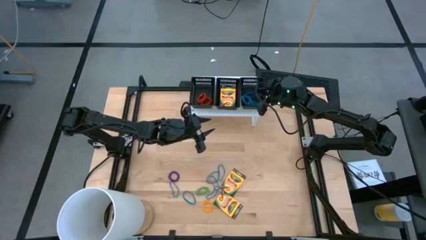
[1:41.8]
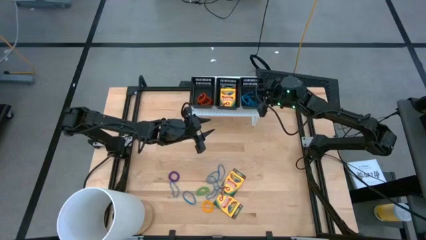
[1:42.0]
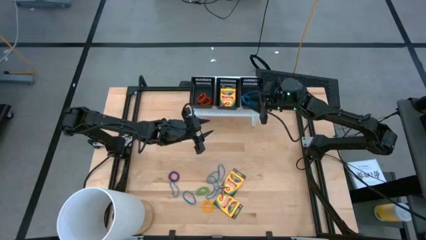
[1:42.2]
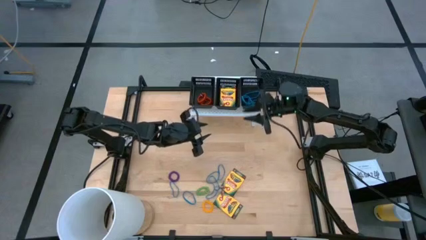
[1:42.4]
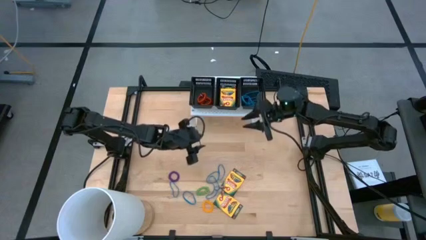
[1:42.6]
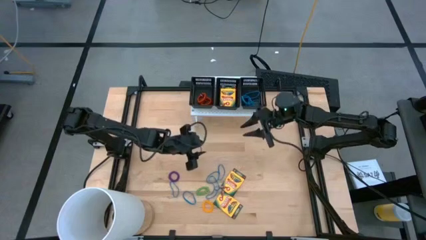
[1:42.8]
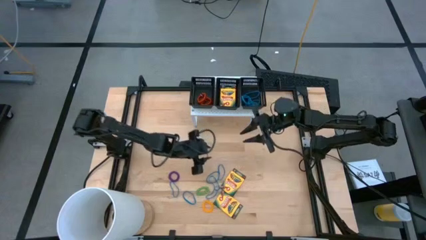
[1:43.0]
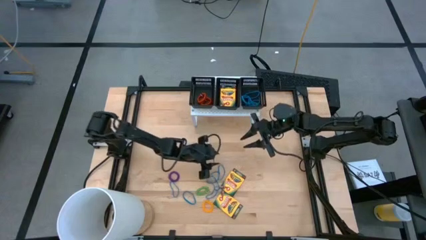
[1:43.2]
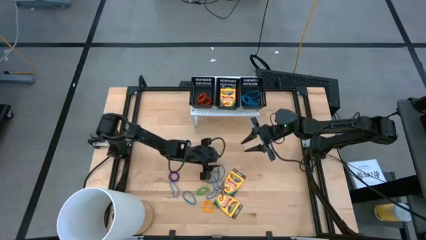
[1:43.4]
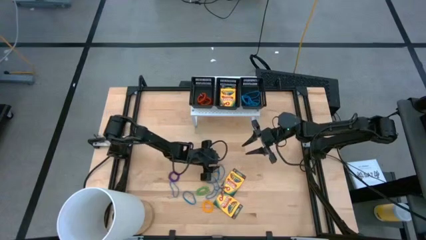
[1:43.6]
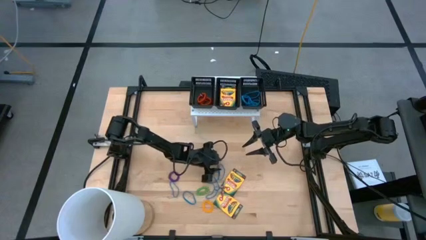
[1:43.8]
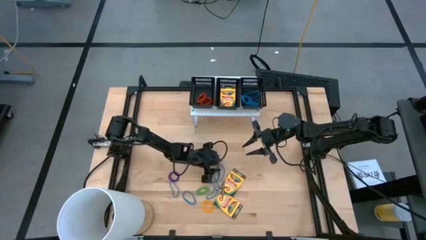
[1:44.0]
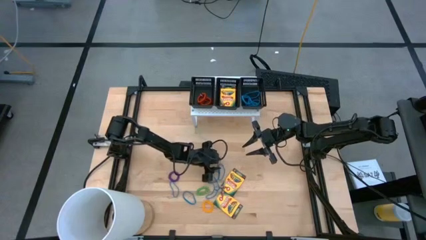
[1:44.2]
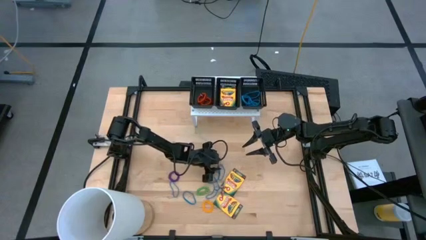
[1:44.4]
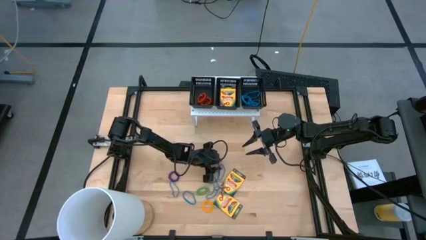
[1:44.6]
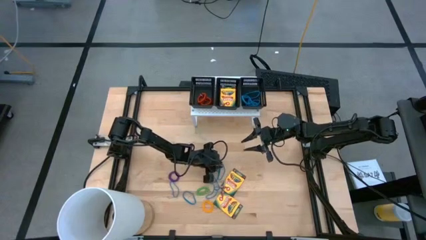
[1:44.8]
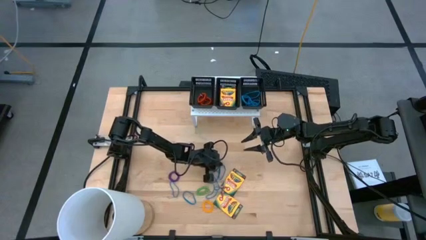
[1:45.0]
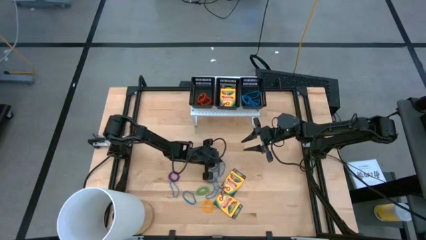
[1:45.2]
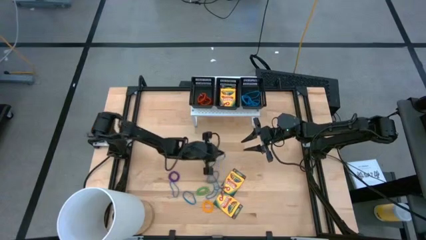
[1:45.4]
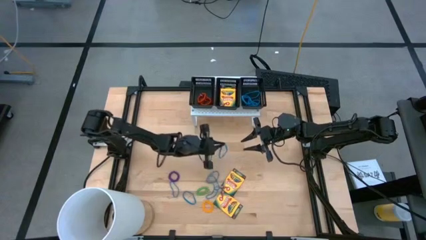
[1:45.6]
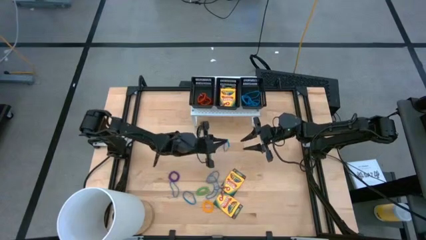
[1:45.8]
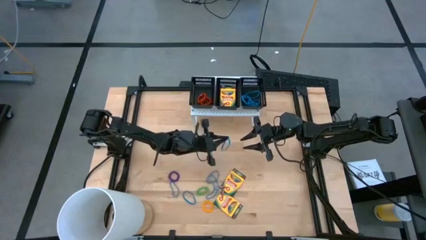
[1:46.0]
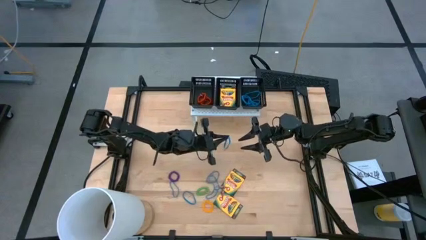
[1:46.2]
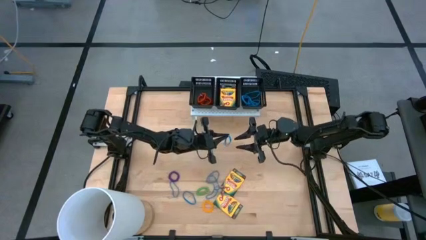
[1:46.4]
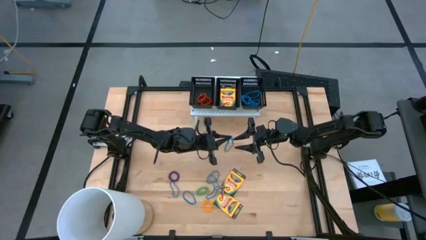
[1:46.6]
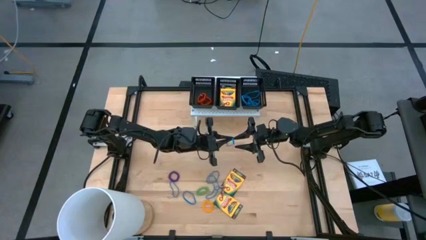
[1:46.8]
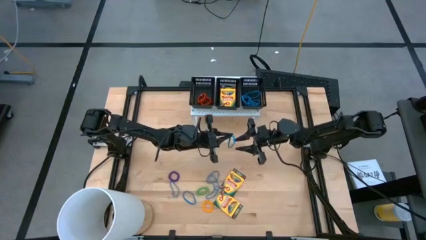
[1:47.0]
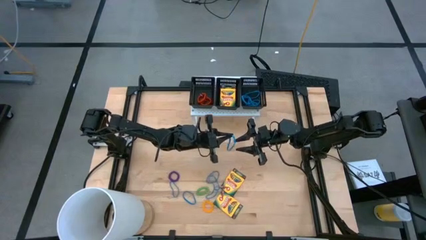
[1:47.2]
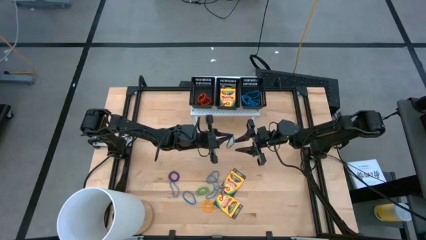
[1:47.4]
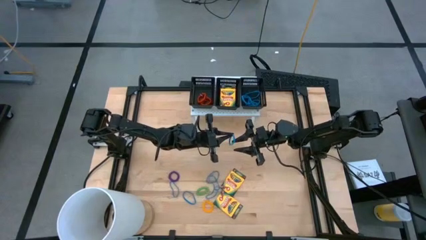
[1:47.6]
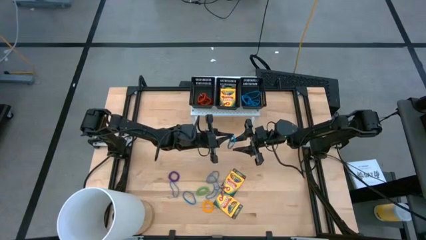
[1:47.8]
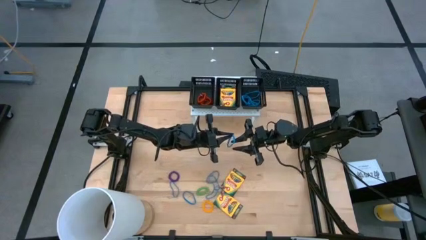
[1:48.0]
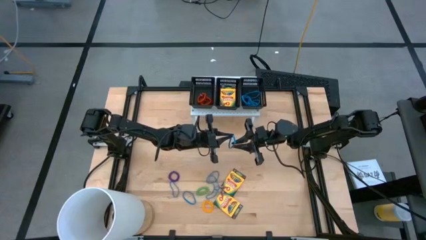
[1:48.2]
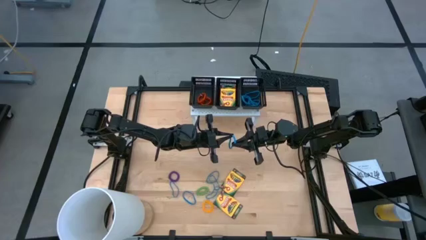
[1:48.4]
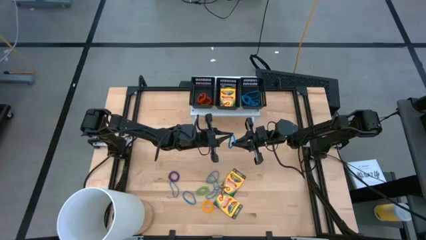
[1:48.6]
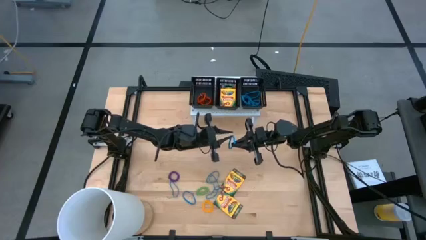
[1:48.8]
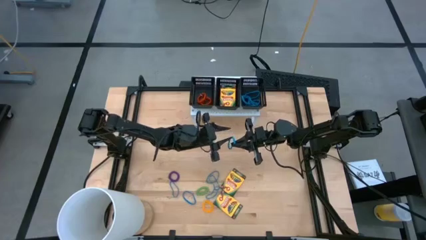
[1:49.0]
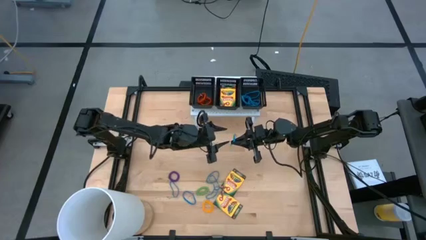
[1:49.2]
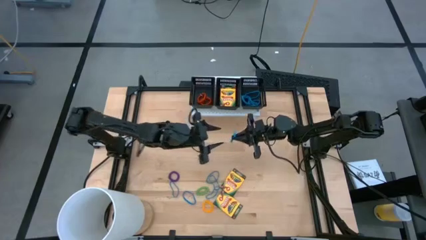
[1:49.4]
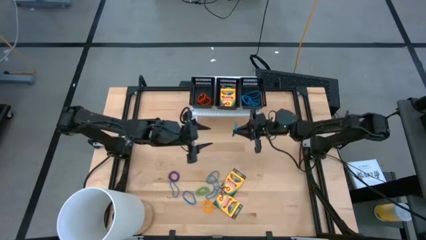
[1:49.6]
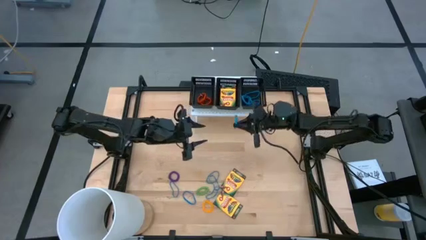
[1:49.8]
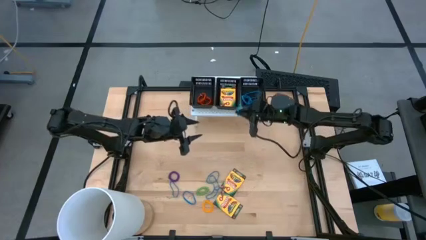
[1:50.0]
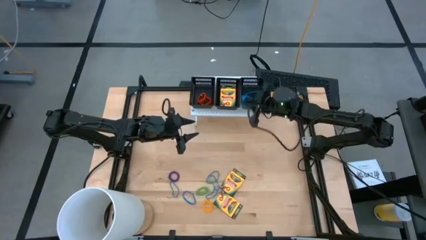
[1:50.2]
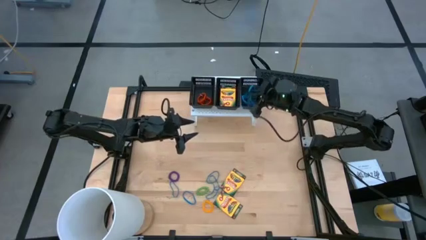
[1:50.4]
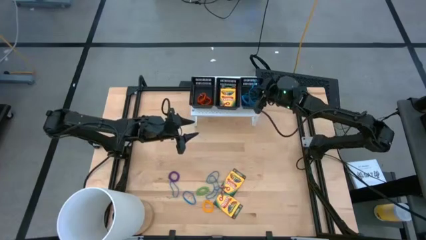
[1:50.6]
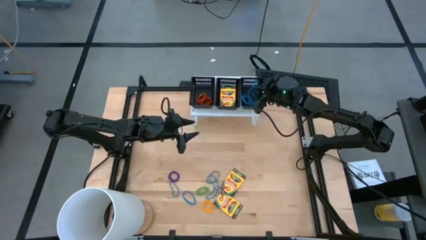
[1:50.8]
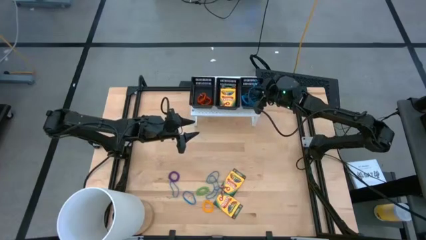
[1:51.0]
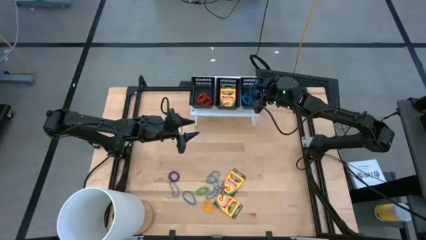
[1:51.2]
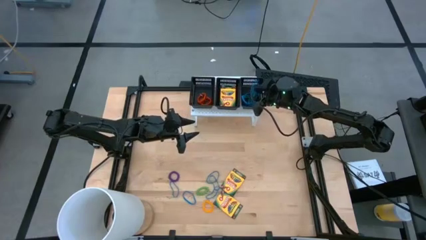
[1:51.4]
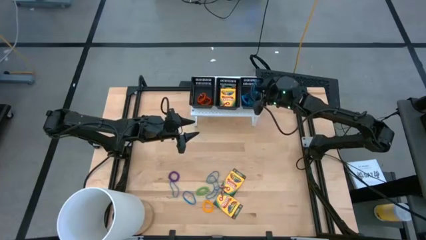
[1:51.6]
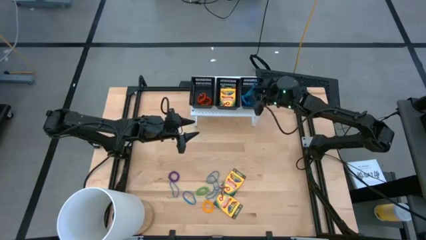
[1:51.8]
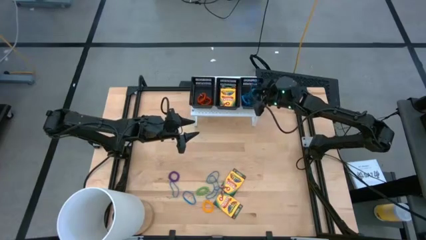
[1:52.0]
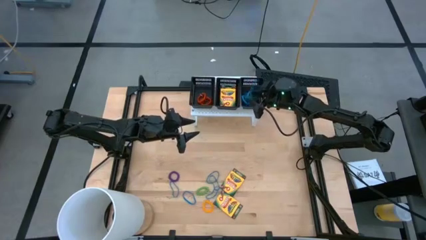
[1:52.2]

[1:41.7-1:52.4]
Task: Pick & Place Office Desk Supplies
Put the blue rubber band into the right black bin on the shelf

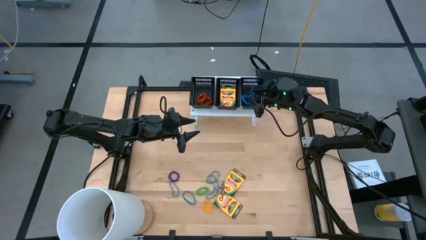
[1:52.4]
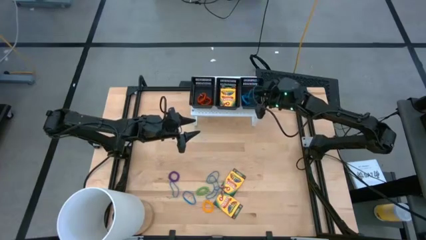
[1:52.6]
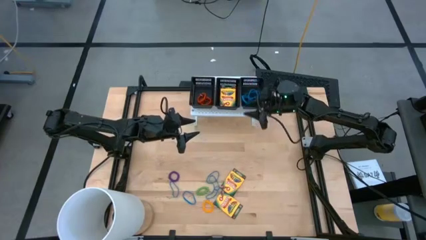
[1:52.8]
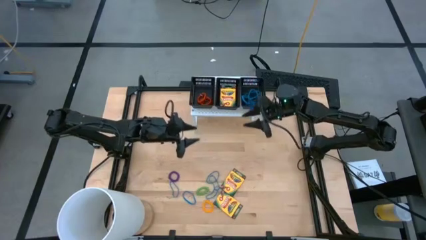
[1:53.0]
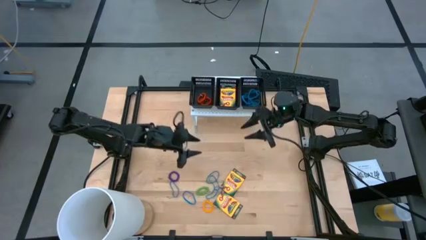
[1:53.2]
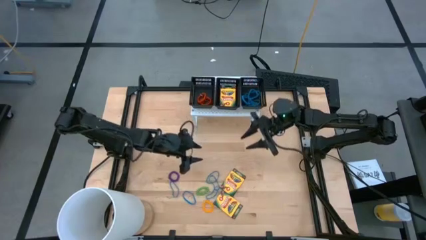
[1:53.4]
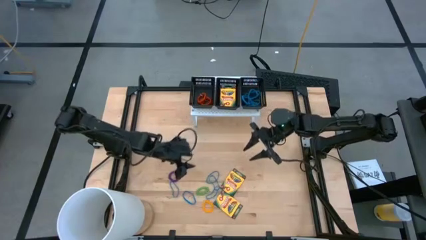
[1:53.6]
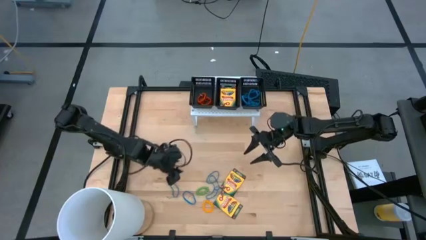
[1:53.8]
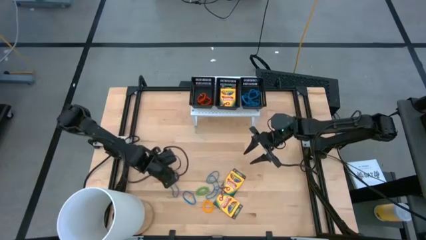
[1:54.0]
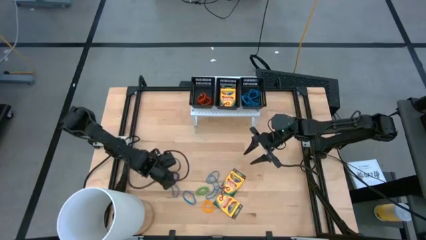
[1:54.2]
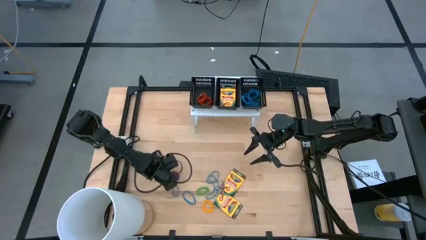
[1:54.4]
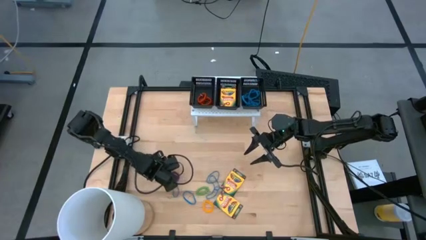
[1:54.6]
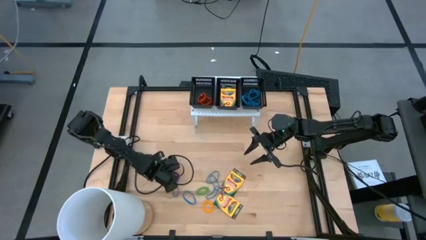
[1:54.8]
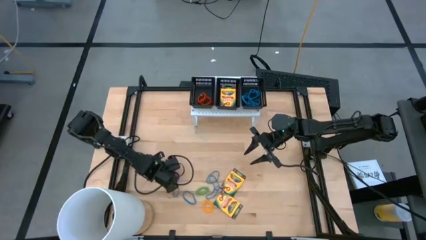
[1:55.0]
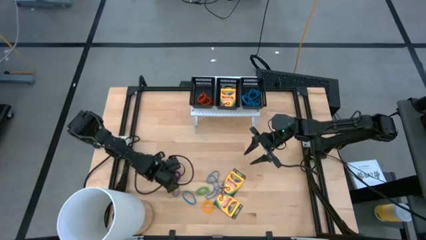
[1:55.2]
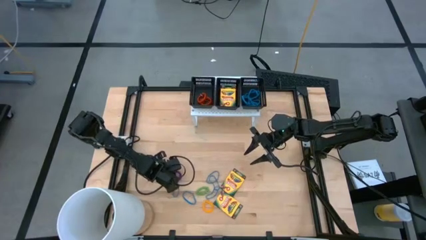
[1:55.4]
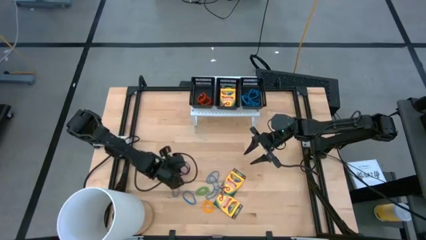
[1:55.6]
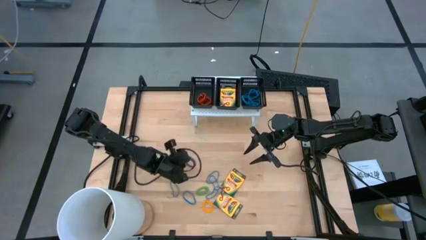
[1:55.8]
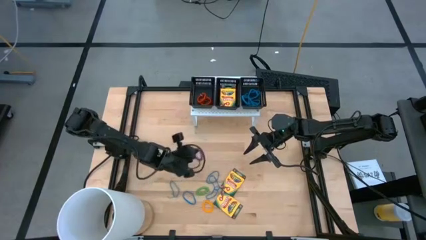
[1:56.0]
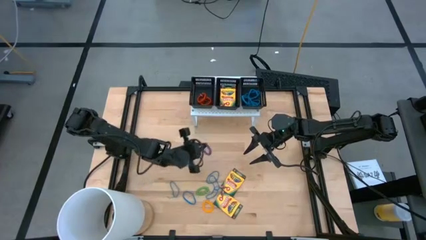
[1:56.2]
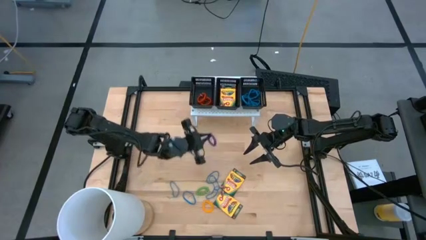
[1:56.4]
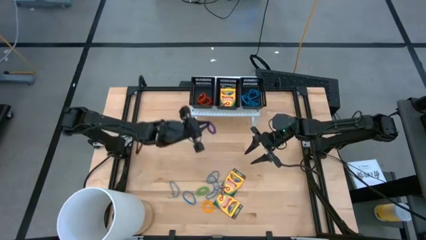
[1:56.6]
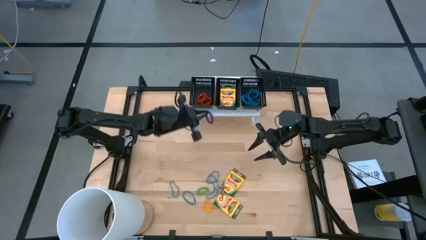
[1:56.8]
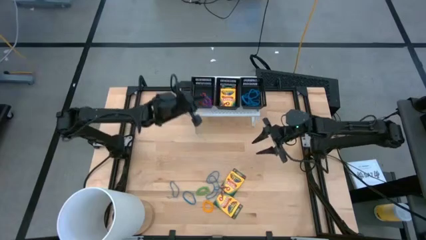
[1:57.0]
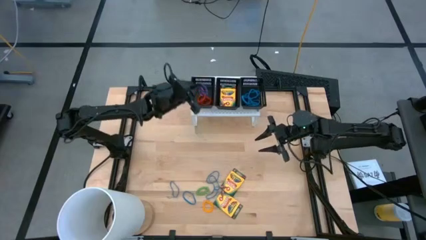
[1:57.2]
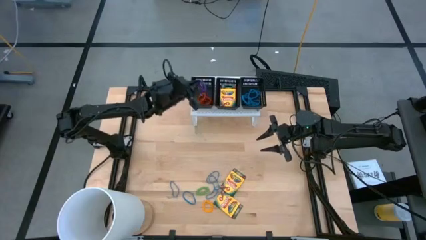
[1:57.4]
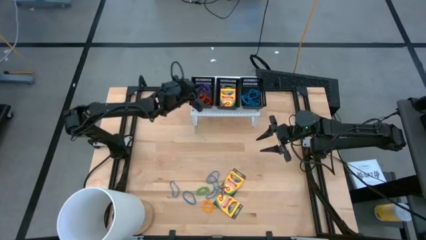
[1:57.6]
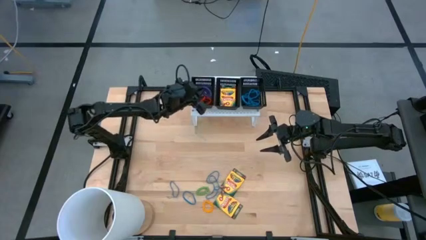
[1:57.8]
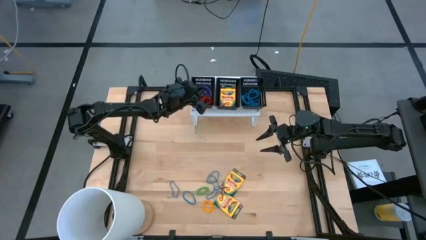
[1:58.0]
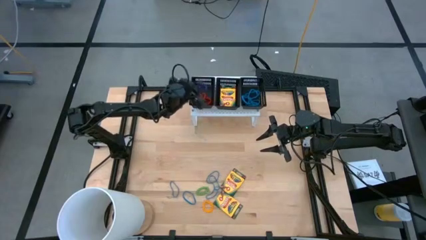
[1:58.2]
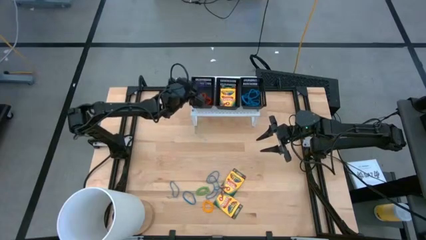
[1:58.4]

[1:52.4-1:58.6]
Put the violet spring keychain into the left black bin on the shelf
